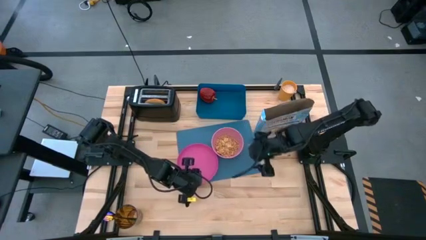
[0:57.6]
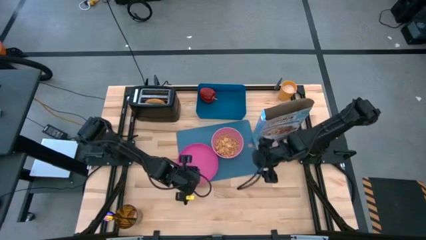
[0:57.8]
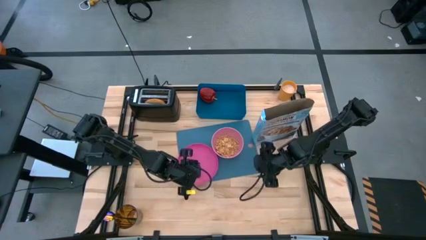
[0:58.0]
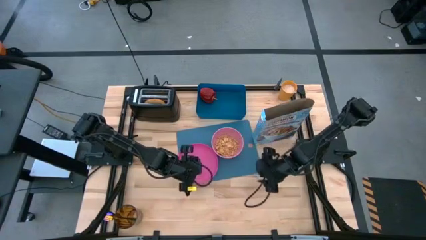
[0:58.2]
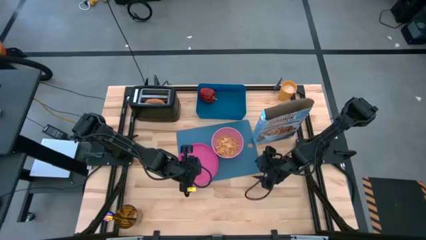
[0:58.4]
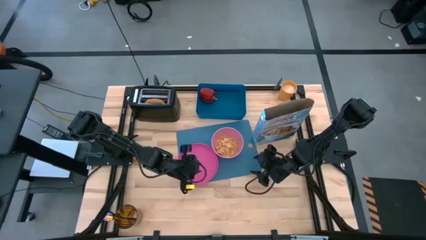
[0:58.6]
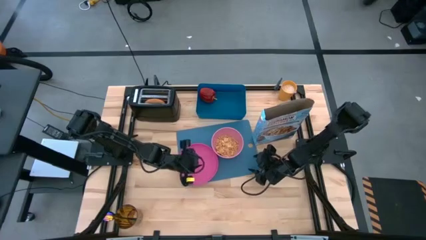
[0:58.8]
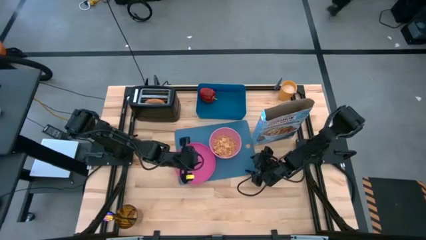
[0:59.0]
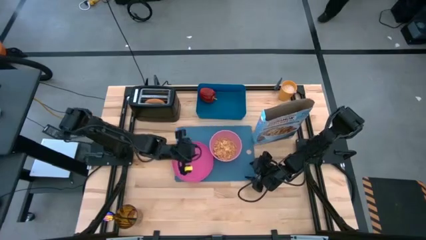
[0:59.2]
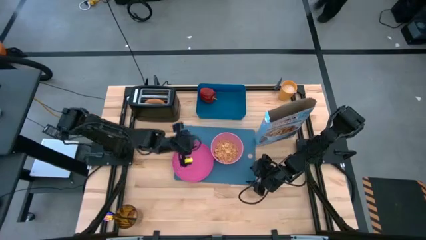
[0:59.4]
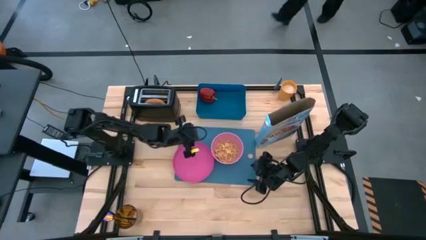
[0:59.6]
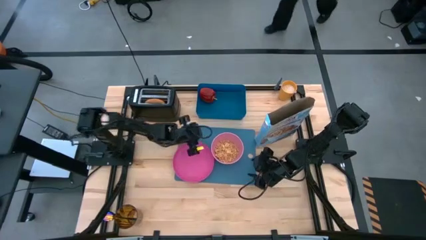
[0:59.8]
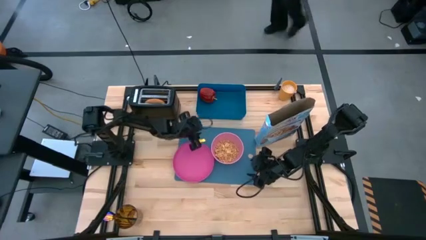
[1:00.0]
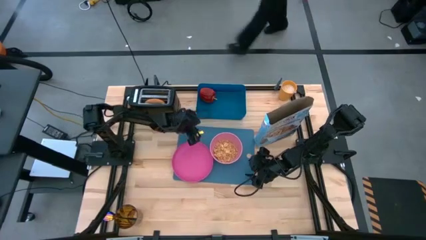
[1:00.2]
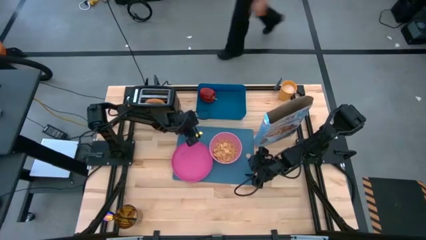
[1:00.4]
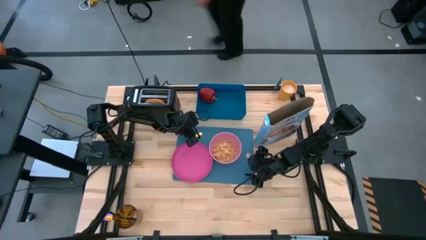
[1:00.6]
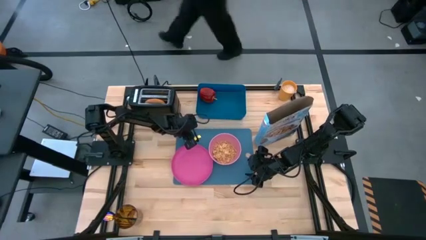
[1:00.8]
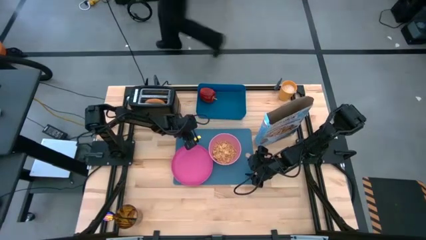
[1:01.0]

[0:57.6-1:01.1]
Task: Arrange a breakfast setting
Adjust the blue placemat

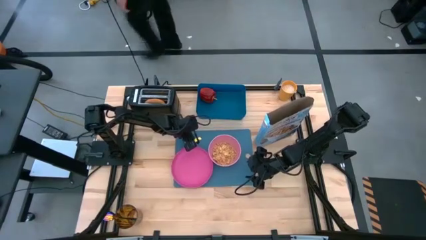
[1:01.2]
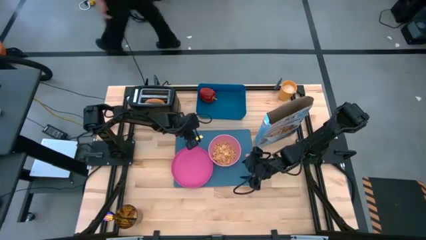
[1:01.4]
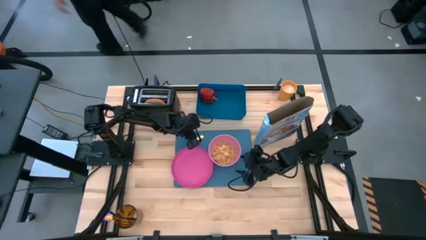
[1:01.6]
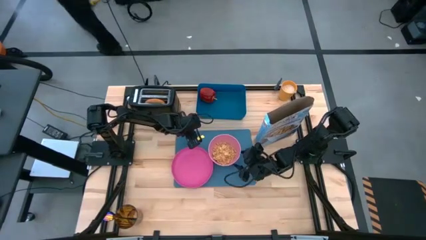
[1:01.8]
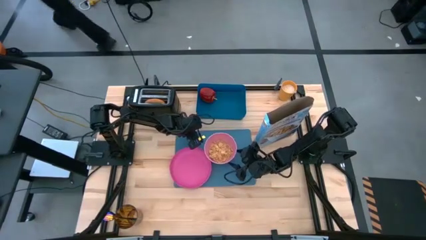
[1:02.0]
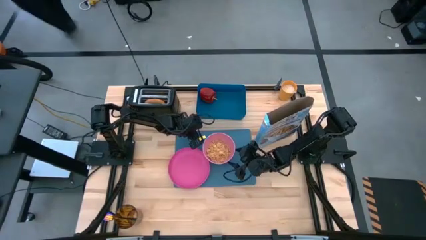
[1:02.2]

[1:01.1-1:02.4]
Adjust the pink bowl

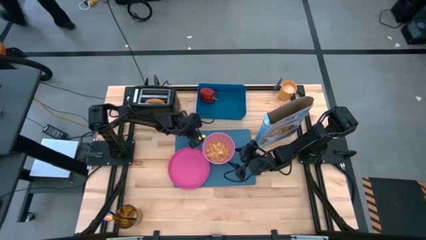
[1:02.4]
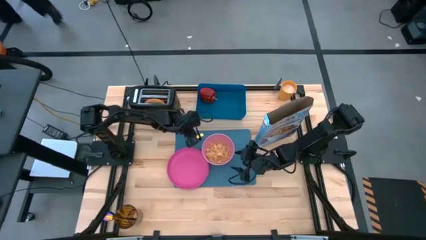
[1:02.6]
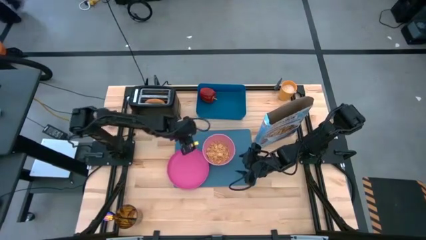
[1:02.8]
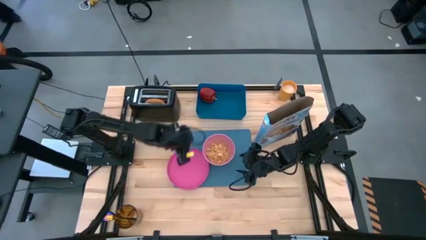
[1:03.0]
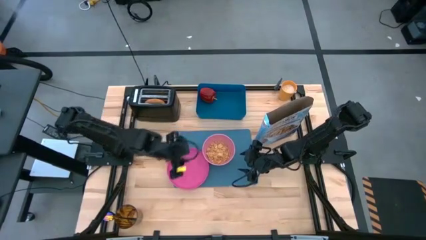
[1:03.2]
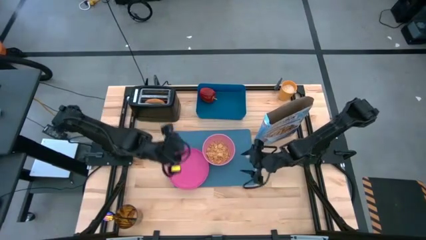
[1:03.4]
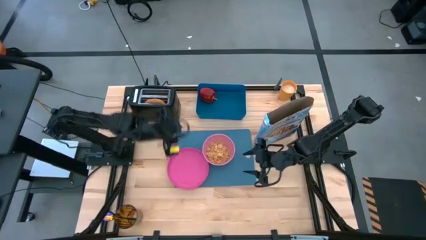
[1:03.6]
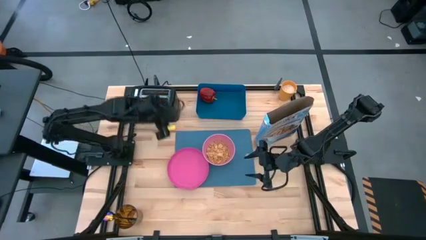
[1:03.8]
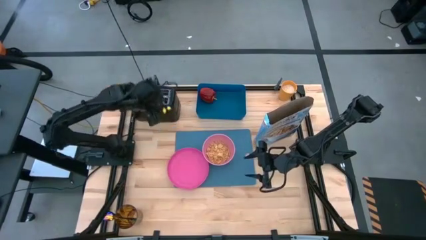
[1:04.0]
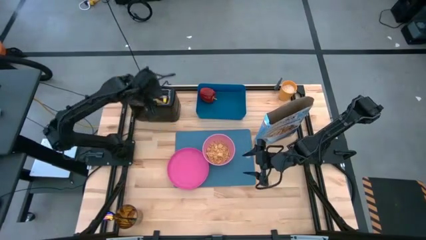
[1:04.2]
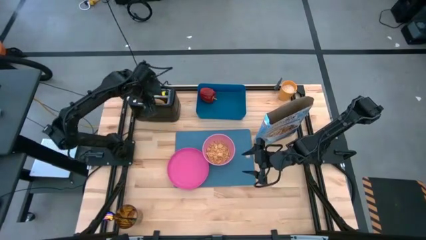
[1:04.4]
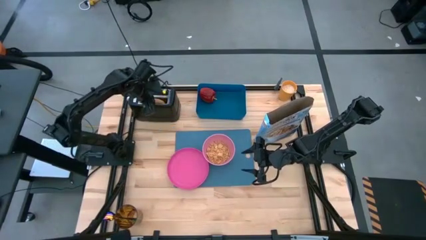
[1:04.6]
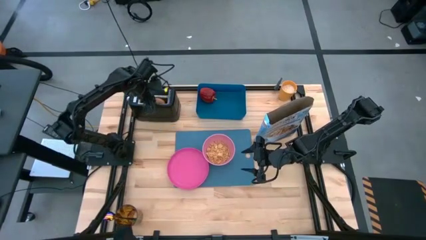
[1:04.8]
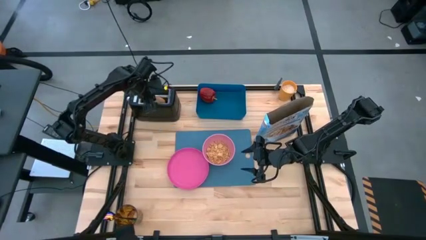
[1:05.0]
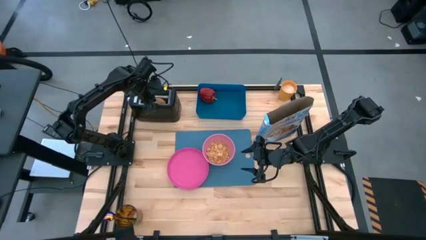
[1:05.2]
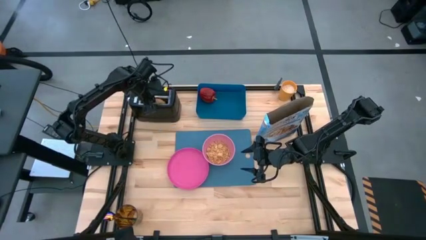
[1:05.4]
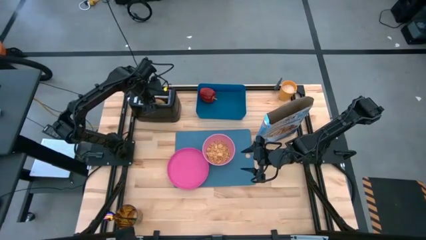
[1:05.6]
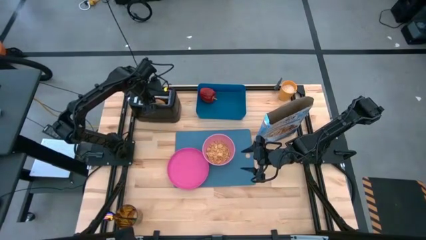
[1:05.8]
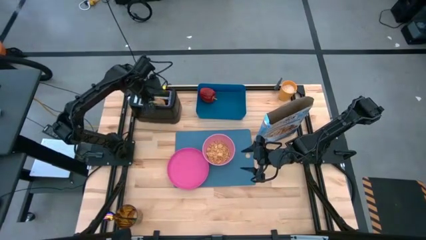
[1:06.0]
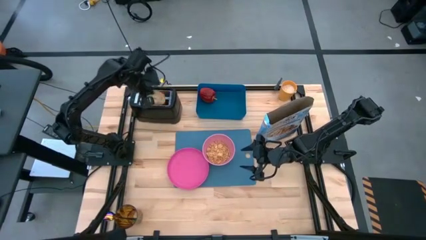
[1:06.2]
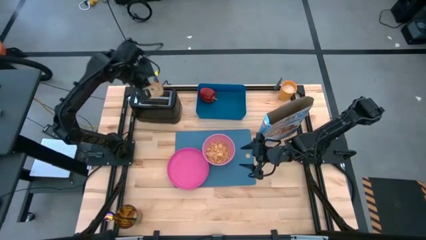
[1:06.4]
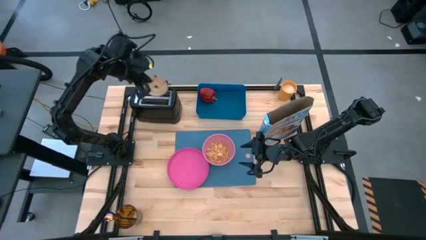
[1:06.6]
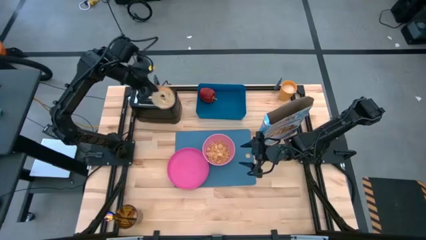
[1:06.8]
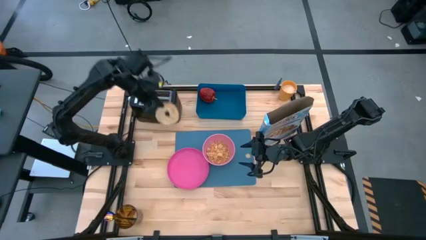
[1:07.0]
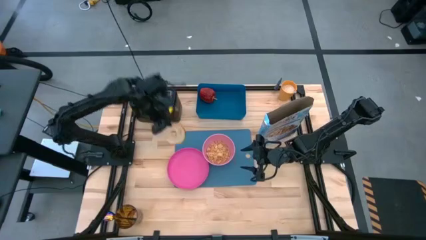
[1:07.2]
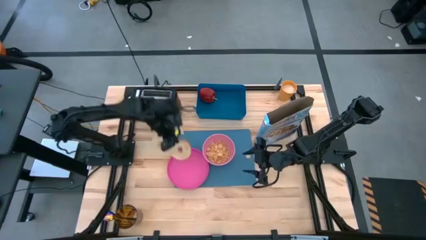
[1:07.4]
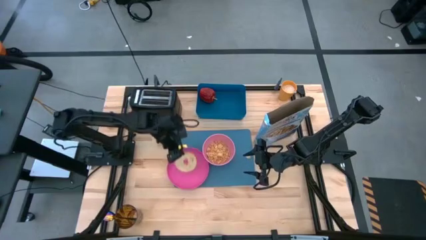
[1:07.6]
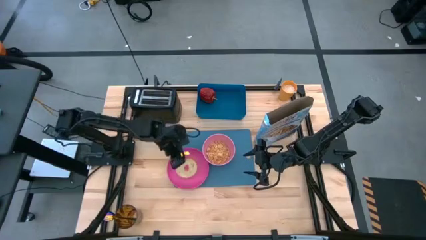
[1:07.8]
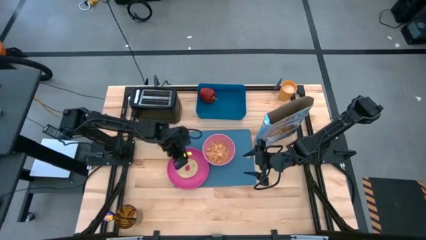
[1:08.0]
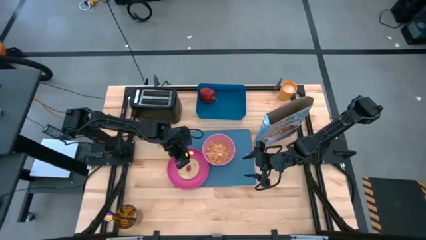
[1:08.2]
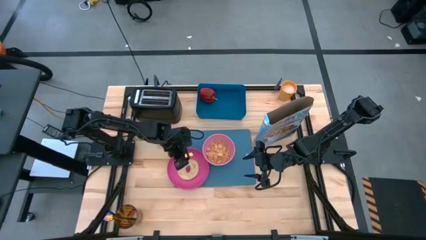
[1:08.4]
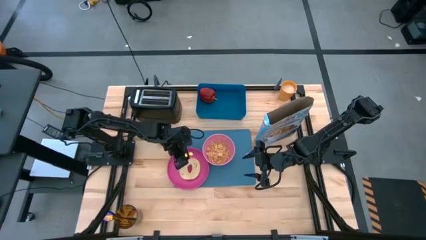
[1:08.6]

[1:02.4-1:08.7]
Put the bagel on the pink plate

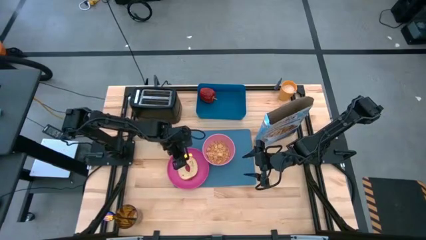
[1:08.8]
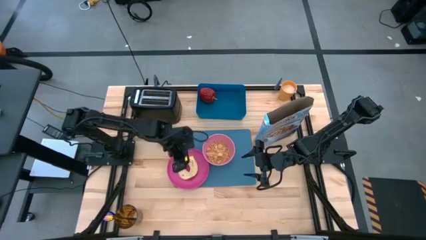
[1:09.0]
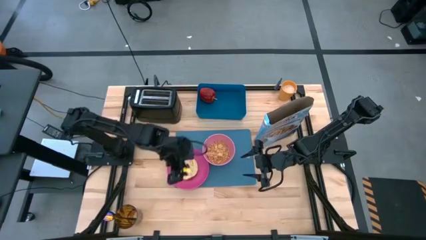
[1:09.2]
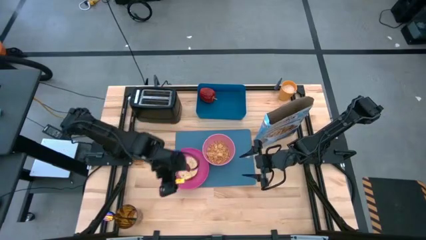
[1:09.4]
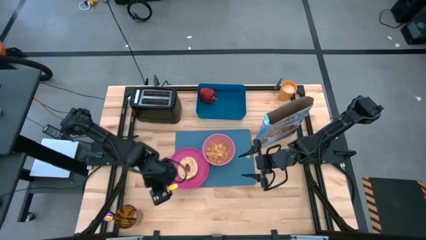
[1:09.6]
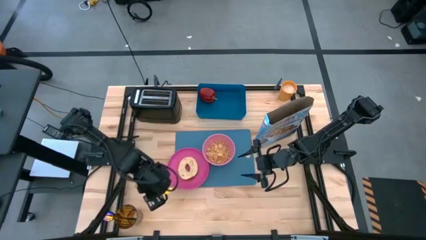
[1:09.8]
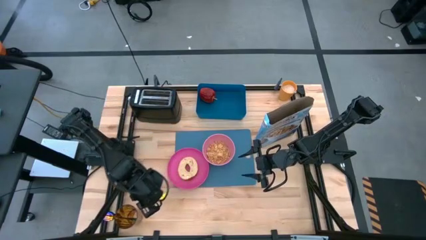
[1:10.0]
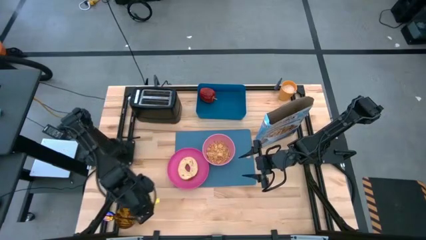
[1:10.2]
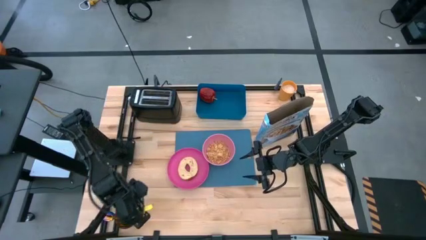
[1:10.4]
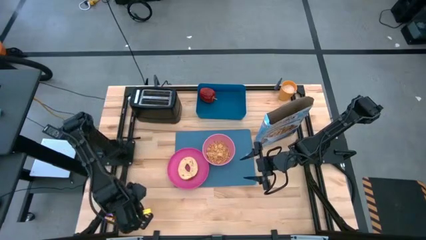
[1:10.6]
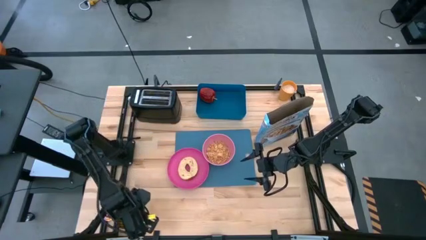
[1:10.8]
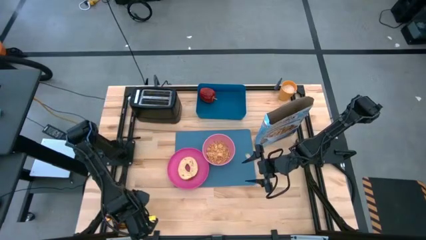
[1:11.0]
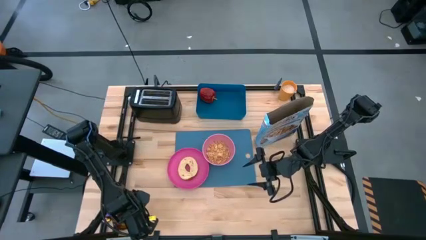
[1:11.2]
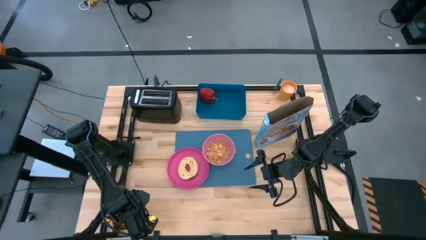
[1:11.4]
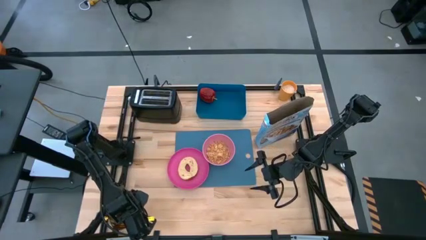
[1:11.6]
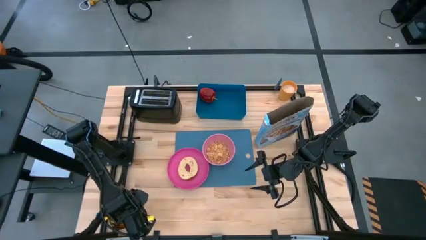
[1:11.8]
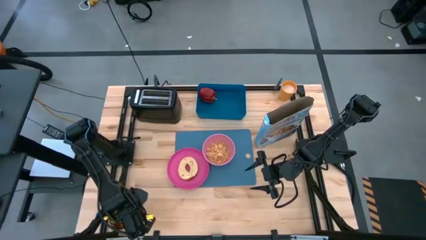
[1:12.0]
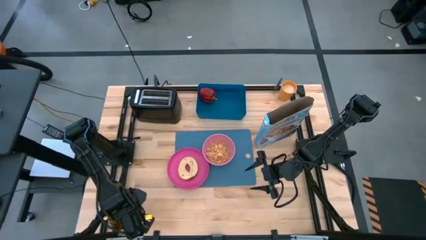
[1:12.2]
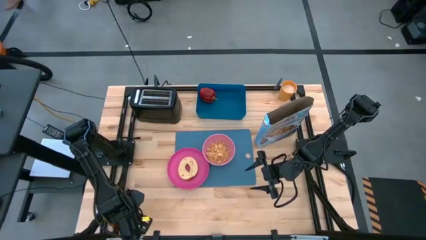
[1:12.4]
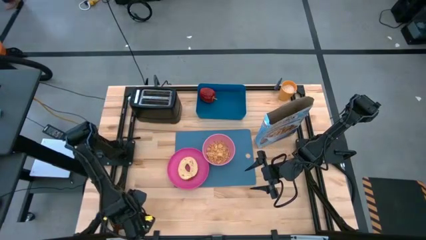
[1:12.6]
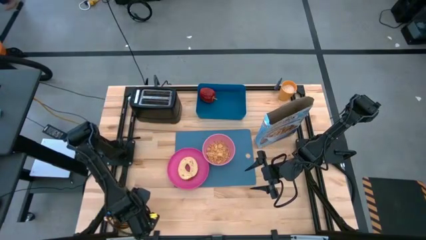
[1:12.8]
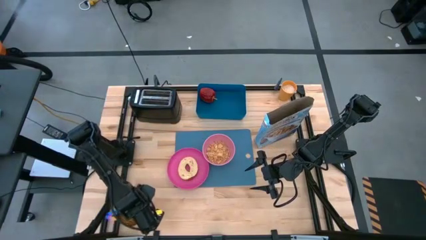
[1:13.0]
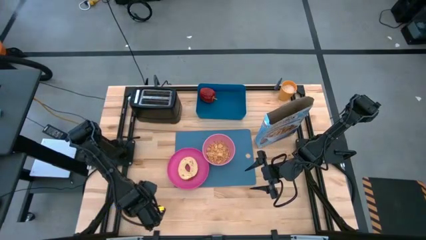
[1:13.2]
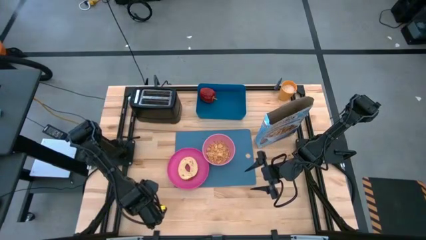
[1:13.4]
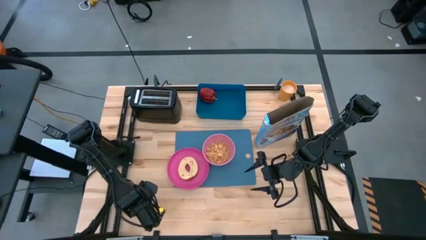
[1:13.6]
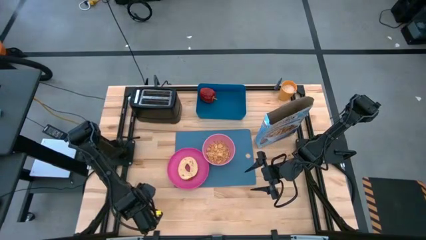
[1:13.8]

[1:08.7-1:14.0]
Adjust the yellow cup
